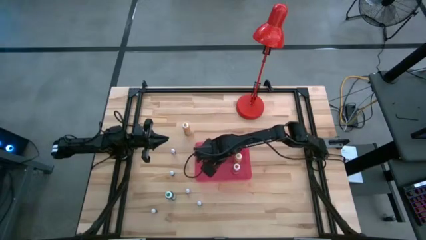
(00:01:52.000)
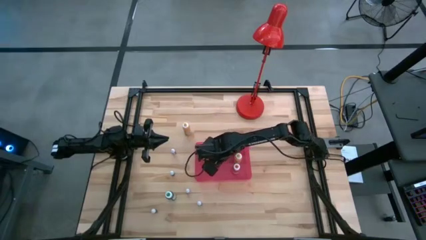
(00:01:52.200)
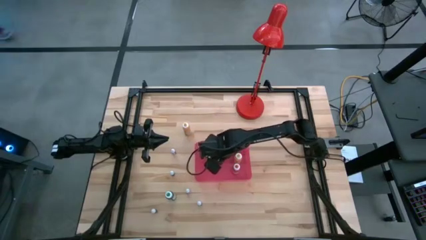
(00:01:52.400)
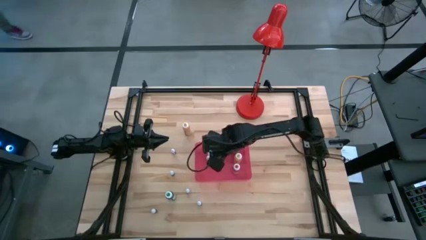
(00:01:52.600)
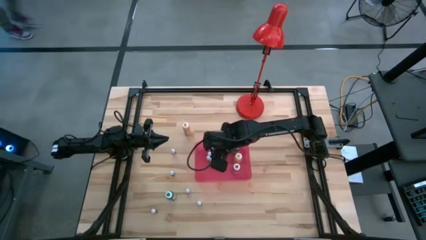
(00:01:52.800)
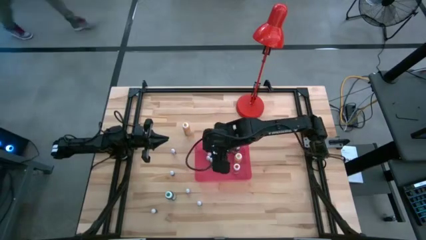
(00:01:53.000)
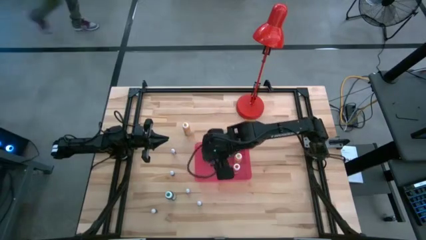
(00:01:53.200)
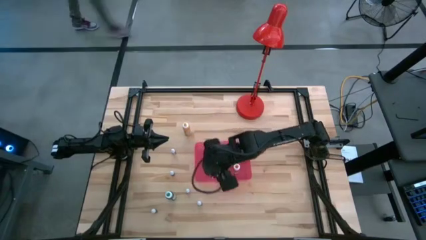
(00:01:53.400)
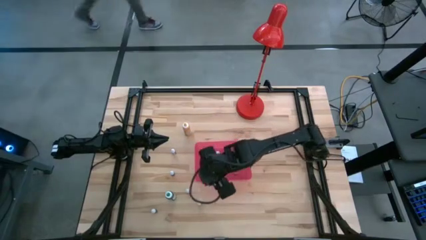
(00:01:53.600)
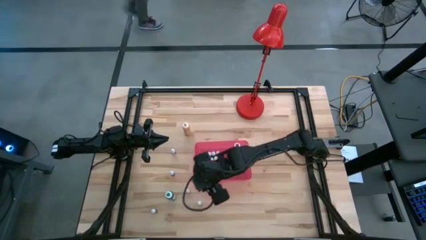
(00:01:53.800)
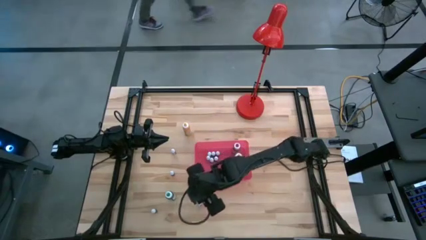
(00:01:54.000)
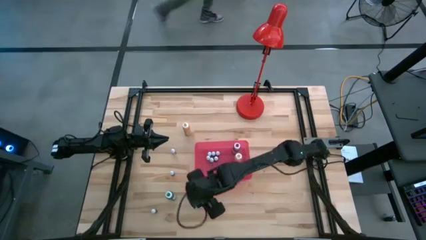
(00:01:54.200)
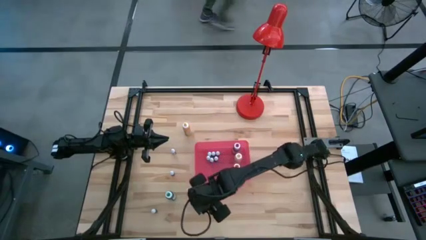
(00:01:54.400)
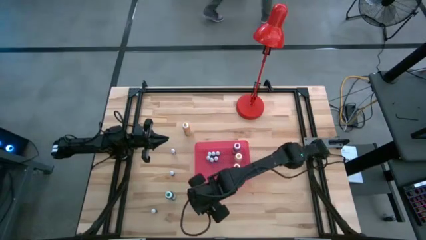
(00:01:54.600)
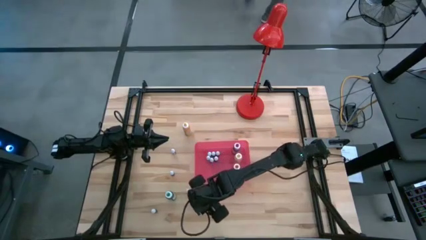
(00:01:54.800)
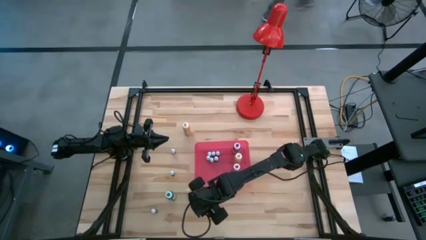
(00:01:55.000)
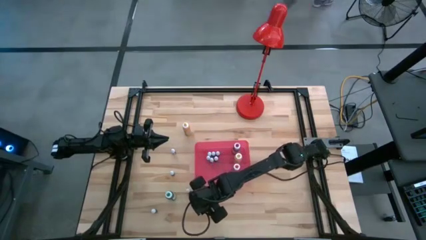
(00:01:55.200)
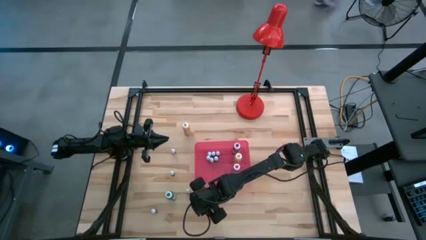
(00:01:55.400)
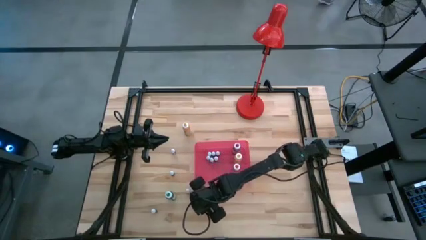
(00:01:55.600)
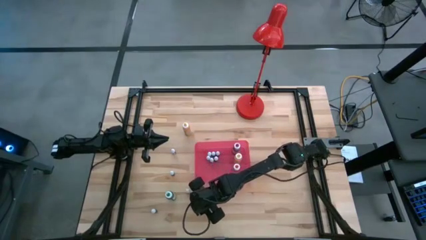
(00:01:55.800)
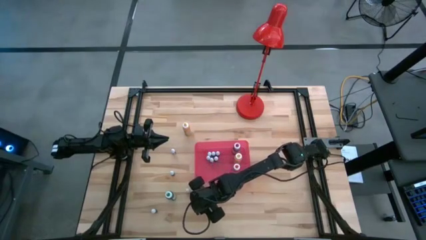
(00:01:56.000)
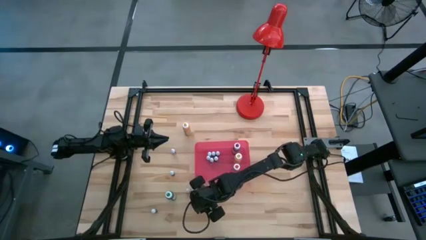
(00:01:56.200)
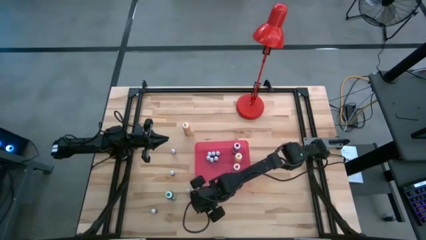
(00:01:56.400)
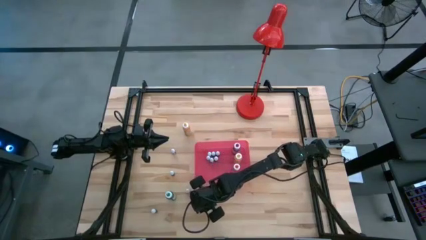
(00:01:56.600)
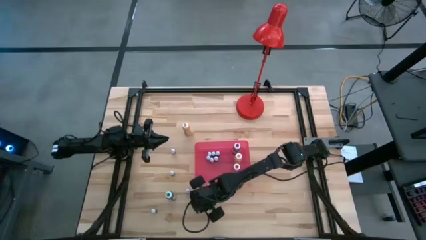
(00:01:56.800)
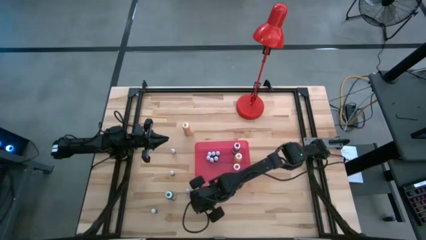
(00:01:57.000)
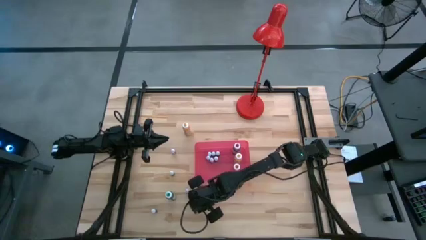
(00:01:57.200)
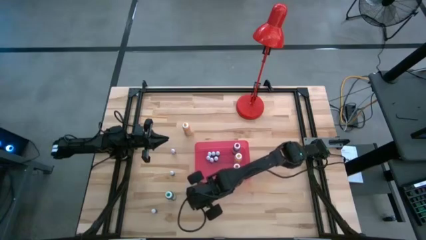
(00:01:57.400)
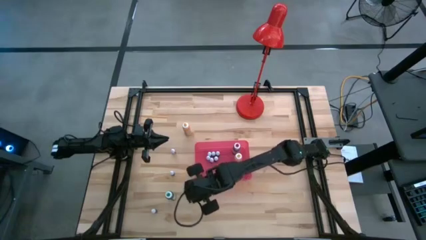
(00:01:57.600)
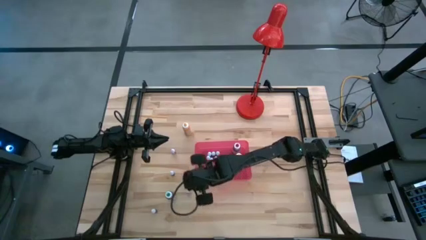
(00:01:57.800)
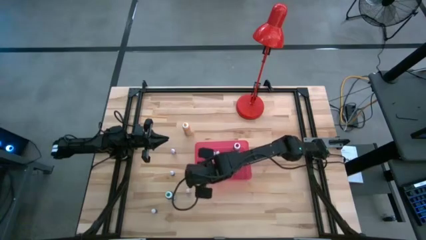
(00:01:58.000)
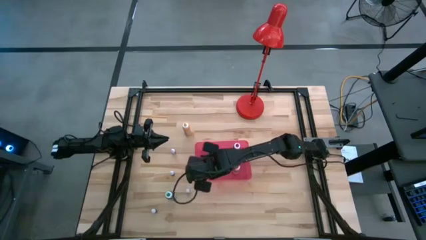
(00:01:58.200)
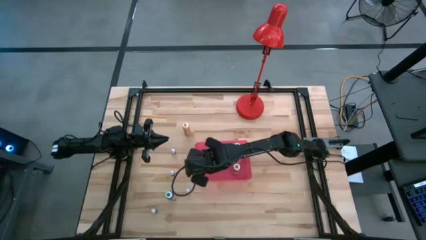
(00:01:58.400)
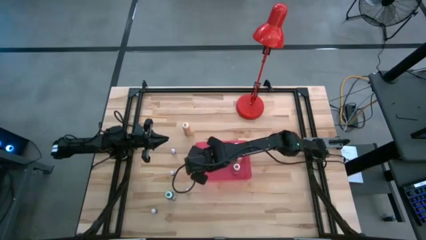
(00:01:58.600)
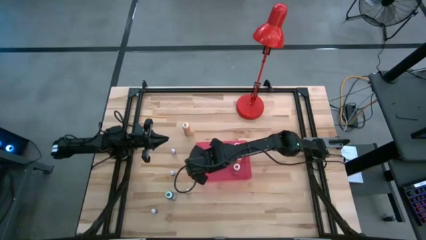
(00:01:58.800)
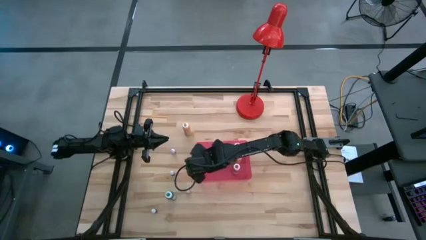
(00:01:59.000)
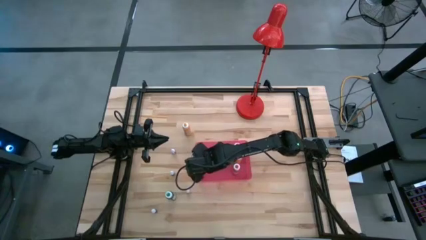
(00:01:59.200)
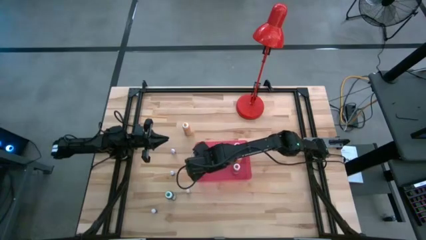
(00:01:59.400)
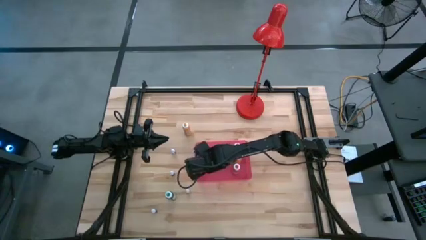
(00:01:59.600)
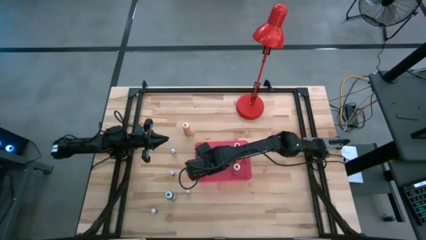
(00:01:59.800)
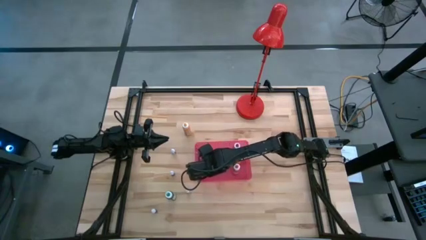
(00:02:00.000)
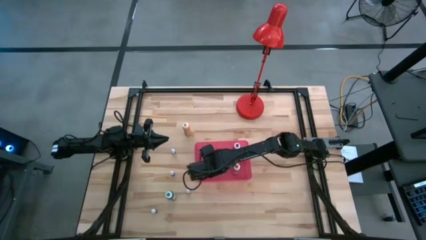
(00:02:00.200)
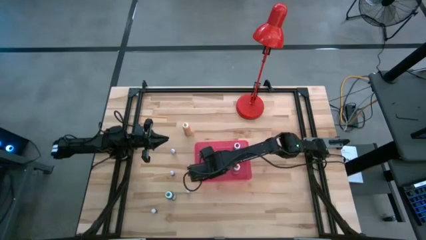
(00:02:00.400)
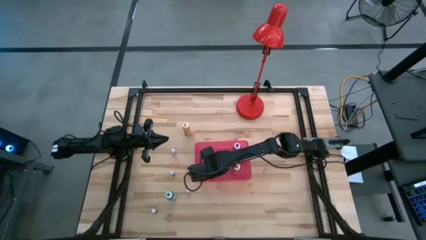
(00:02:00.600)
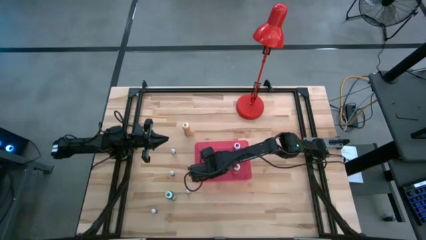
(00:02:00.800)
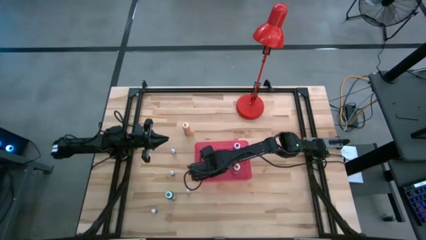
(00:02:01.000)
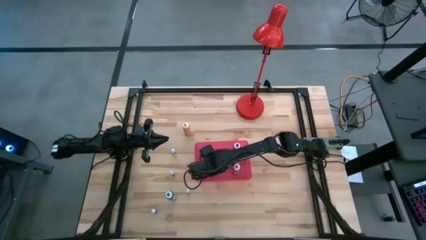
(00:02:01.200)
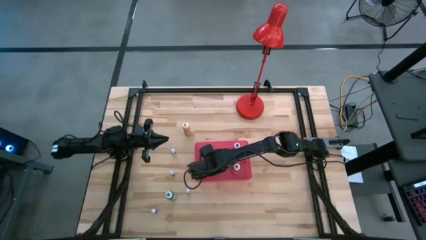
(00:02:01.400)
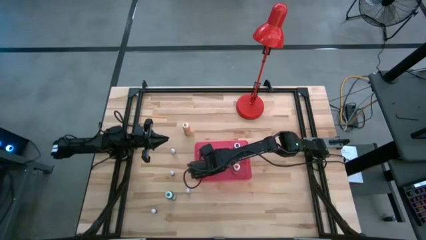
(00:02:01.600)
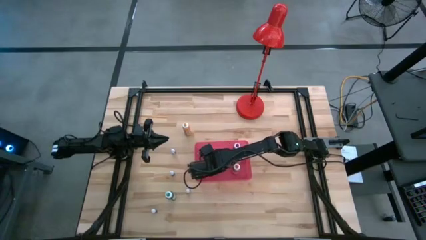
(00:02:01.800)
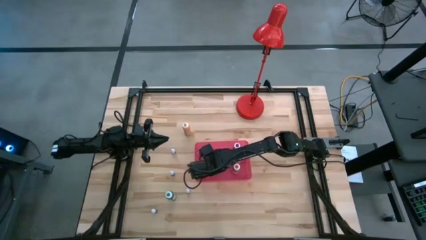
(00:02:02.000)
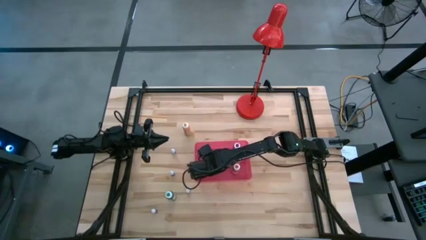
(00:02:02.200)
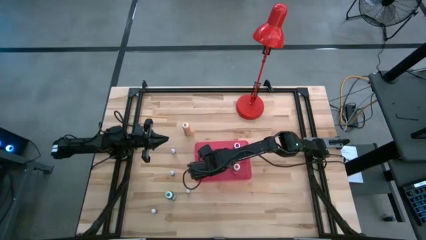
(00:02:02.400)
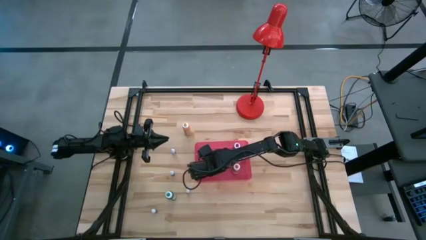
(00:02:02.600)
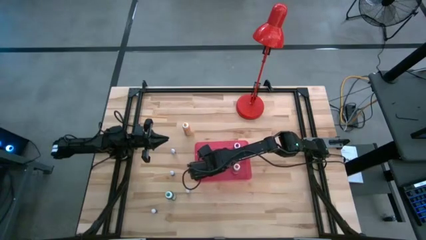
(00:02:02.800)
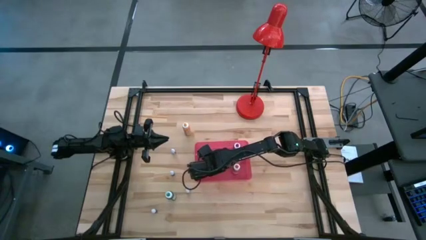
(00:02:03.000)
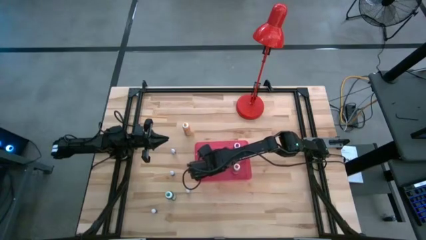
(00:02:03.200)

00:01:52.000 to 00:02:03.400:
Task: Pick & Place food coloring
Put the small violet food coloring bottle into the red bin

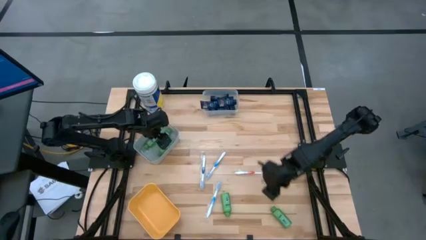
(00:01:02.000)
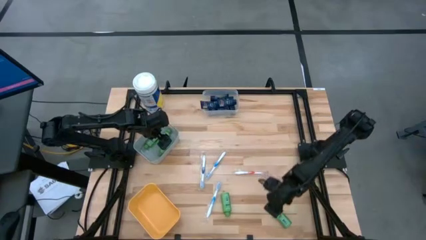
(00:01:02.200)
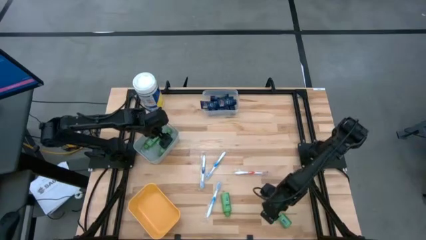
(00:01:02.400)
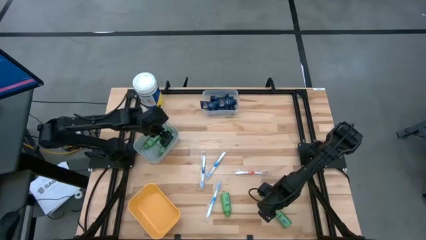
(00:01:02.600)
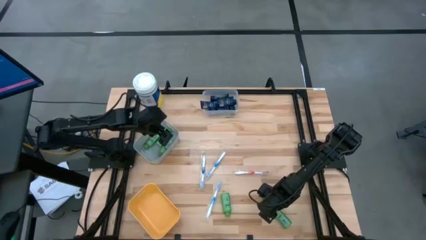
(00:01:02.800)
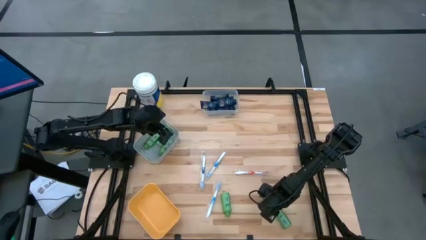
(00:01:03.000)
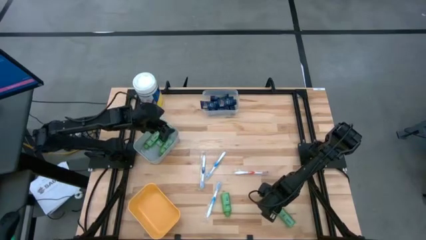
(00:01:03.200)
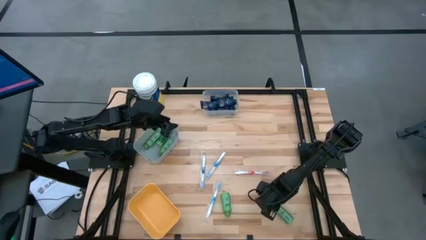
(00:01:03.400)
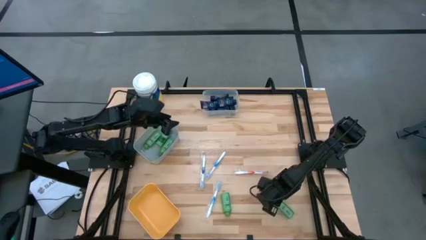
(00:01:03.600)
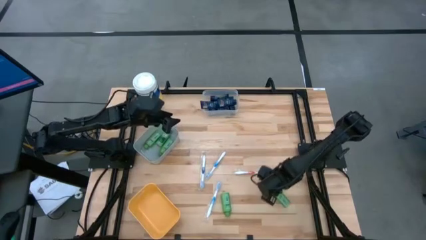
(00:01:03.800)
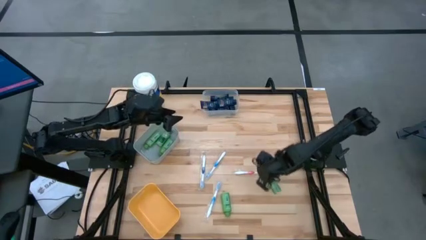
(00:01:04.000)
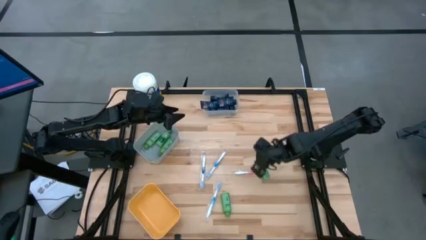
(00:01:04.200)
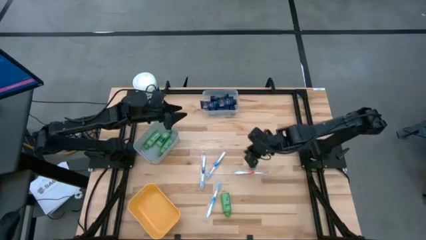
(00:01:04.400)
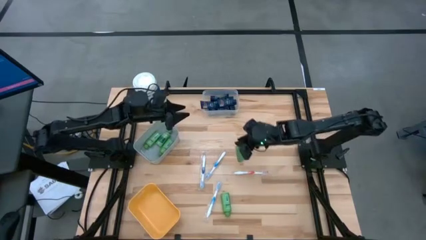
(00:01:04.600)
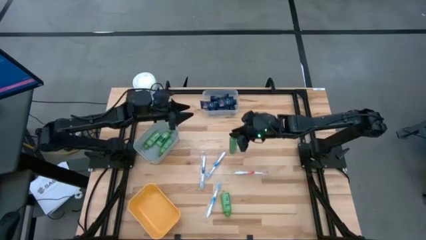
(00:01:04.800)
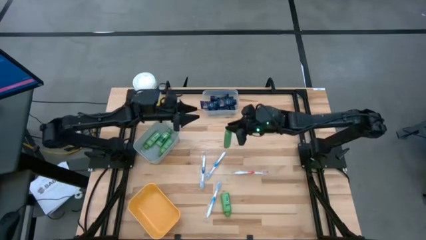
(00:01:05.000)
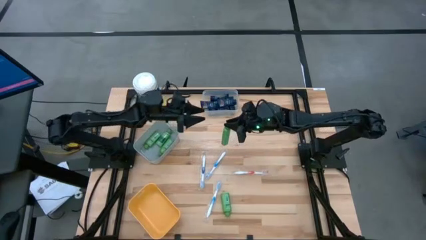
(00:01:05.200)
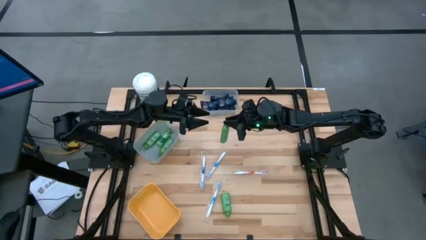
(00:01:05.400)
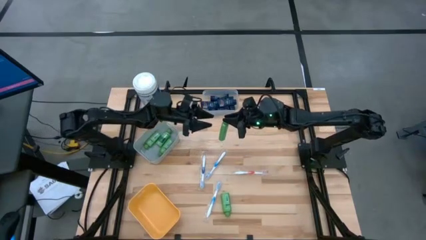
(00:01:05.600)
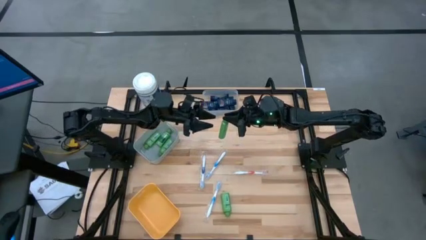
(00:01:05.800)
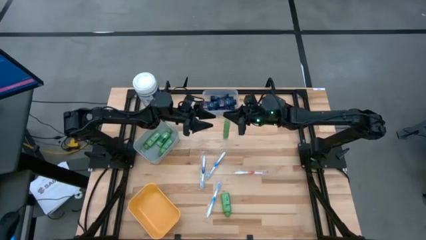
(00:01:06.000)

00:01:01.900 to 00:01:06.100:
Task: Pick & Place Travel size toiletries
Put the green shampoo into the gray bin

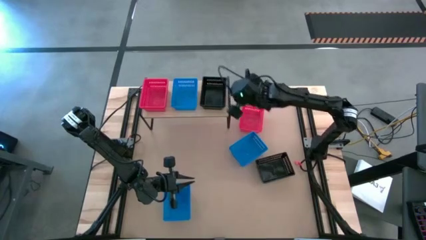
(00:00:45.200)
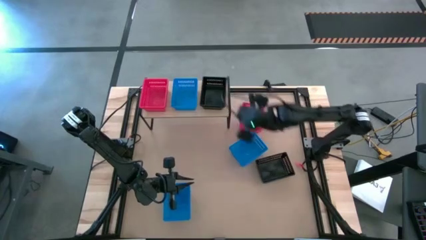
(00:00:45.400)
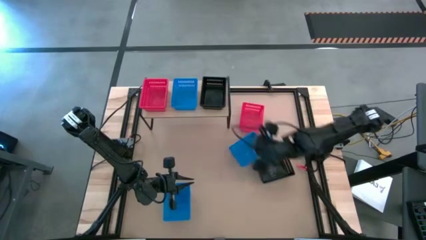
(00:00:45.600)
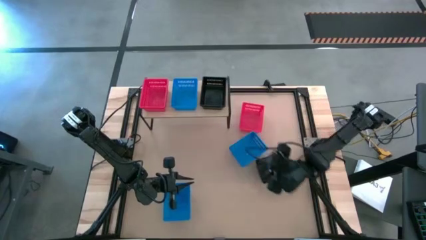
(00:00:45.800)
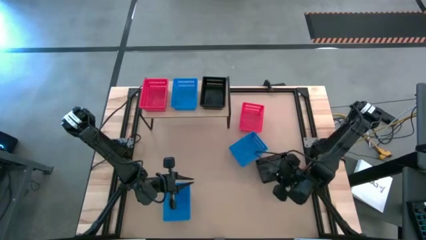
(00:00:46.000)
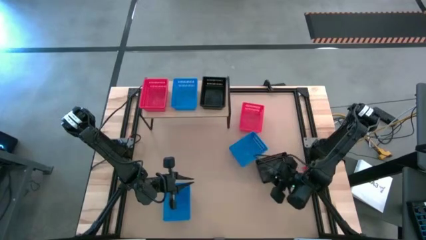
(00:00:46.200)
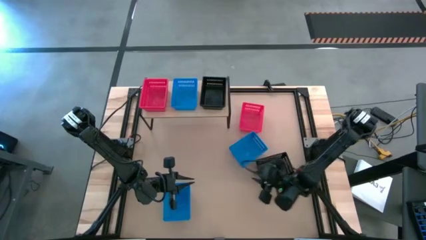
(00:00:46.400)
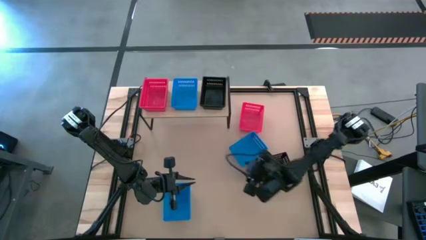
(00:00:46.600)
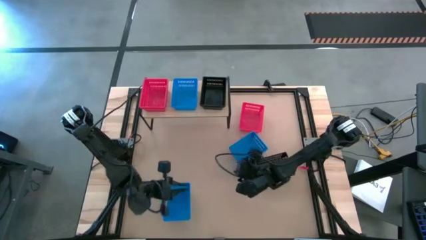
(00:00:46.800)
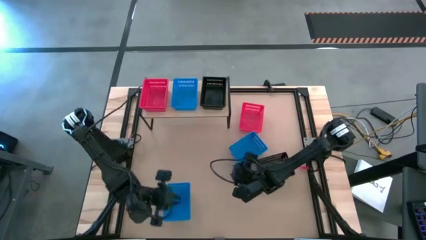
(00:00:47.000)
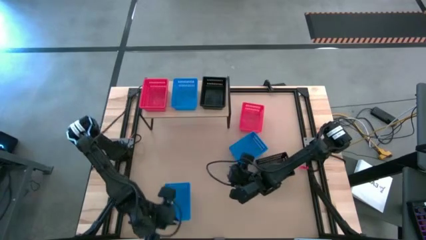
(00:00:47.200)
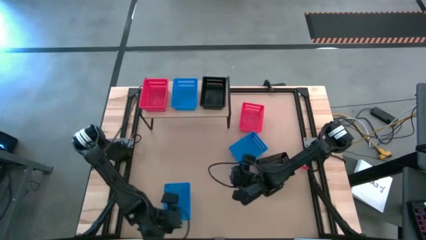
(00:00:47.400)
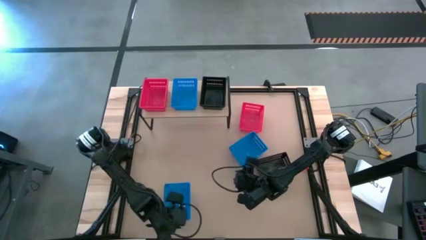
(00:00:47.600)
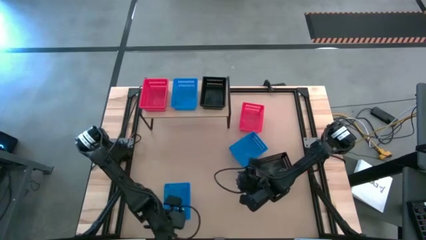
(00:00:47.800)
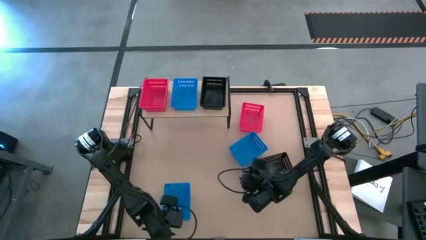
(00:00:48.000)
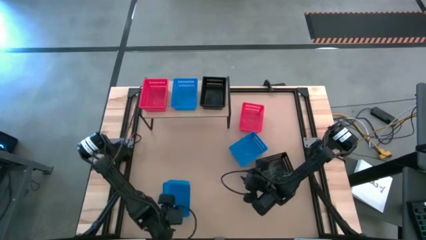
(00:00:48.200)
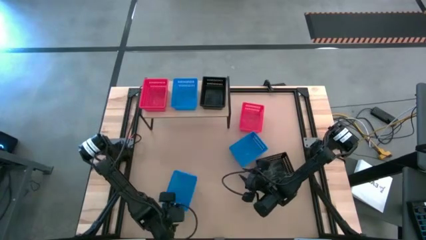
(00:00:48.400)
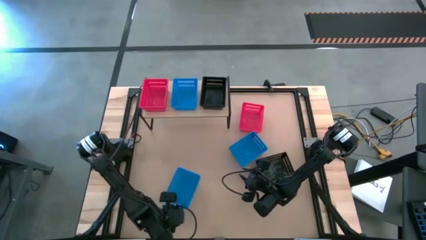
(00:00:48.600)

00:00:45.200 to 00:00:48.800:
Task: Stack baskets on shelf by color
Stack the left bottom blue bin on top of the blue bin on the shelf
